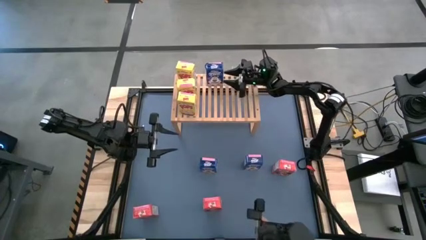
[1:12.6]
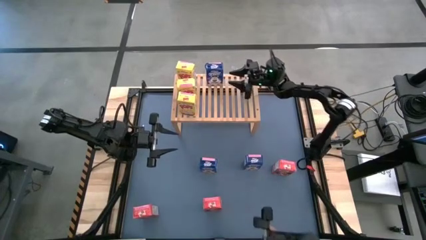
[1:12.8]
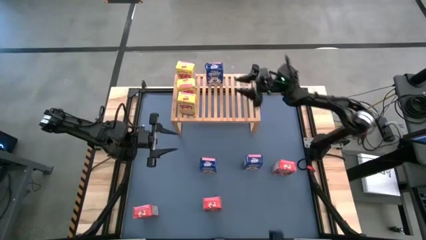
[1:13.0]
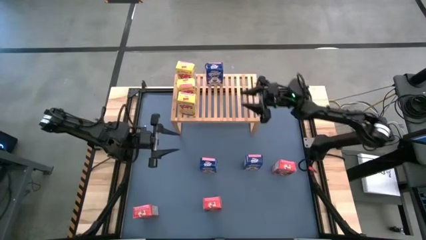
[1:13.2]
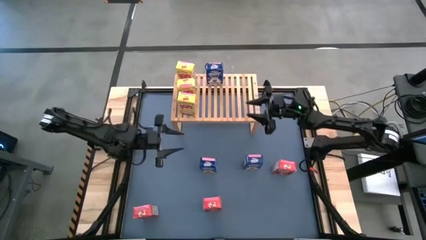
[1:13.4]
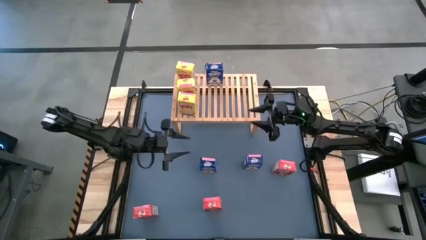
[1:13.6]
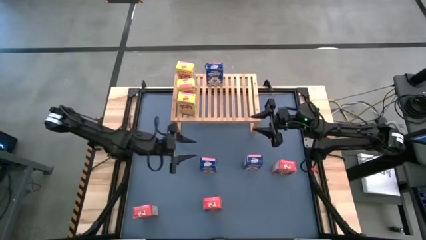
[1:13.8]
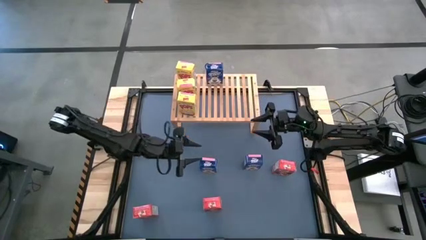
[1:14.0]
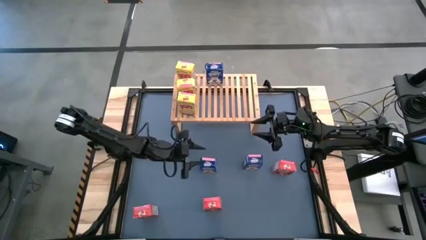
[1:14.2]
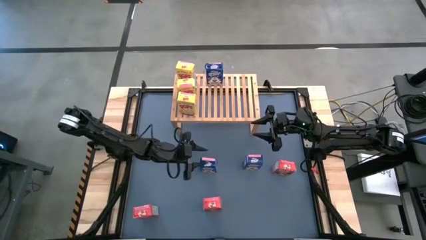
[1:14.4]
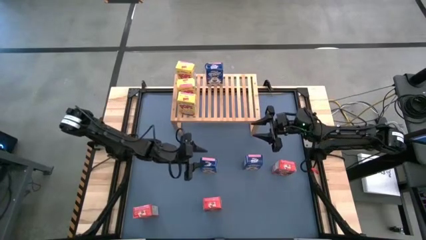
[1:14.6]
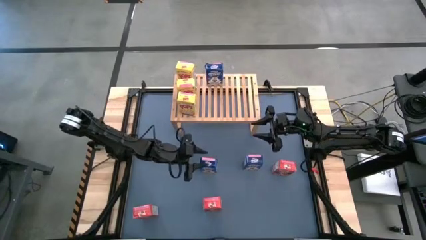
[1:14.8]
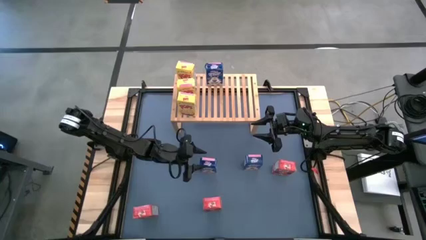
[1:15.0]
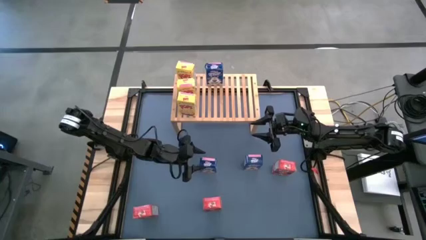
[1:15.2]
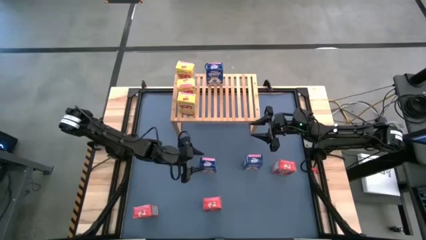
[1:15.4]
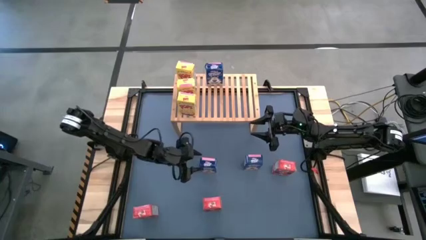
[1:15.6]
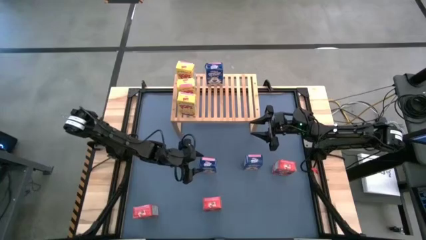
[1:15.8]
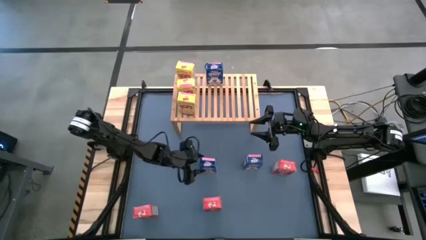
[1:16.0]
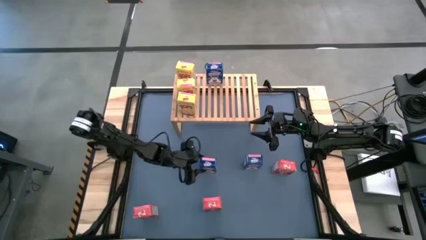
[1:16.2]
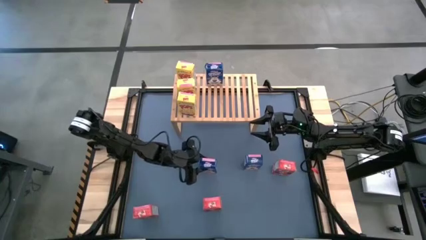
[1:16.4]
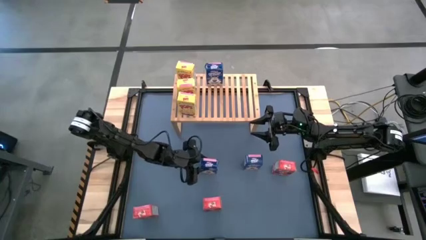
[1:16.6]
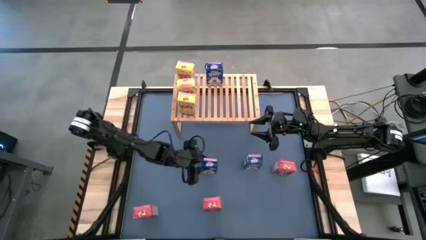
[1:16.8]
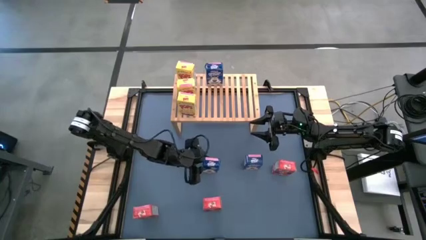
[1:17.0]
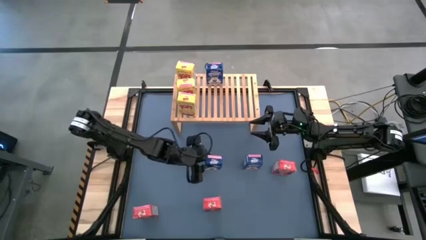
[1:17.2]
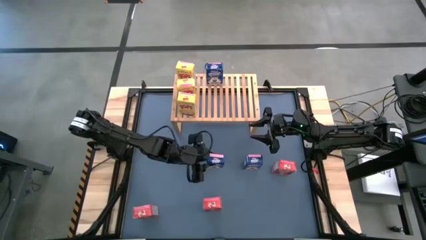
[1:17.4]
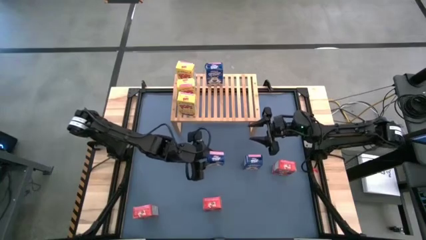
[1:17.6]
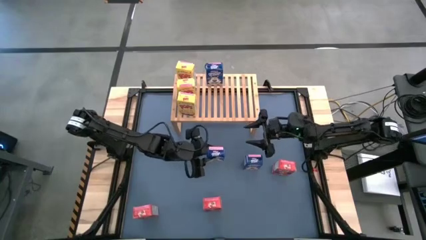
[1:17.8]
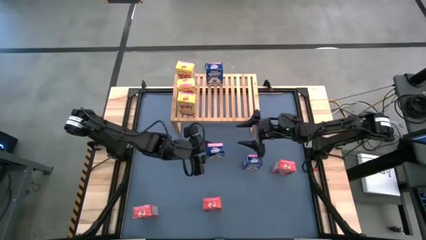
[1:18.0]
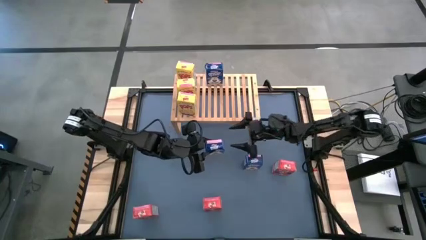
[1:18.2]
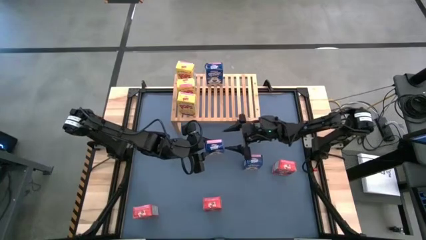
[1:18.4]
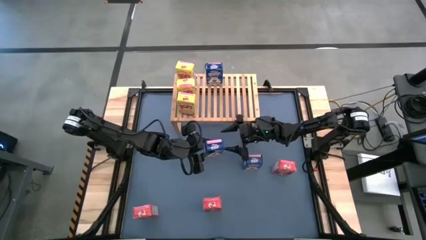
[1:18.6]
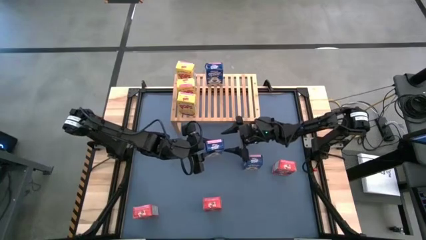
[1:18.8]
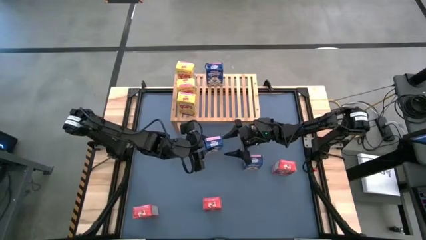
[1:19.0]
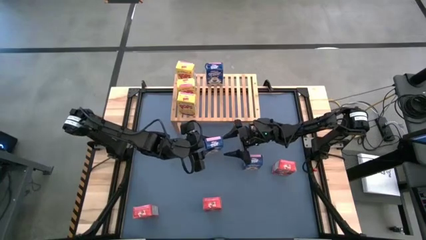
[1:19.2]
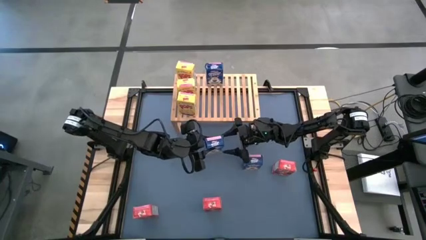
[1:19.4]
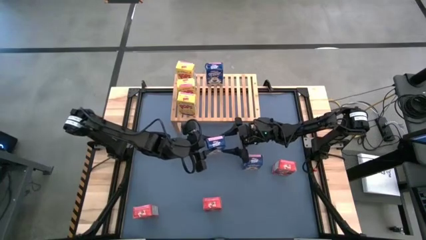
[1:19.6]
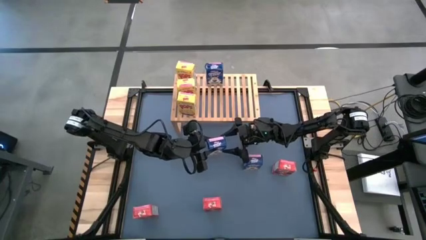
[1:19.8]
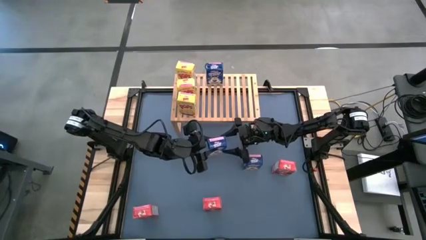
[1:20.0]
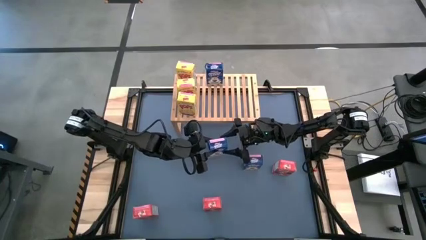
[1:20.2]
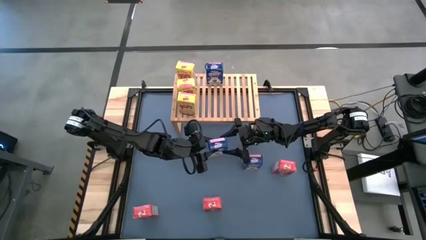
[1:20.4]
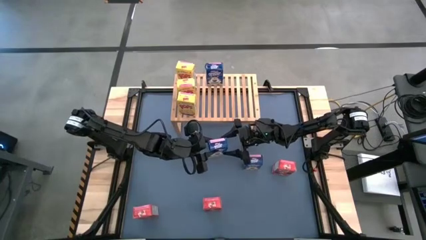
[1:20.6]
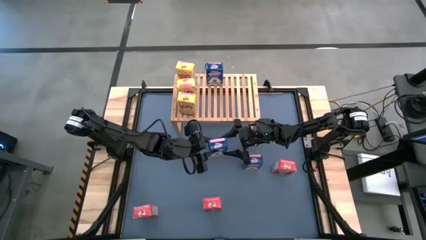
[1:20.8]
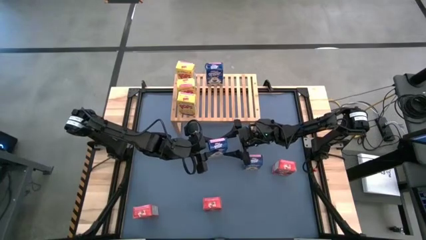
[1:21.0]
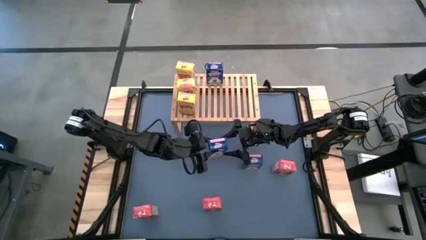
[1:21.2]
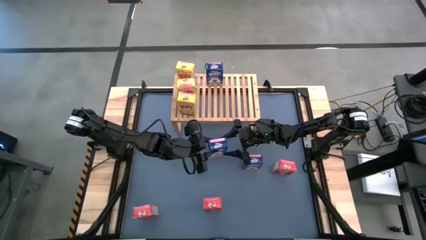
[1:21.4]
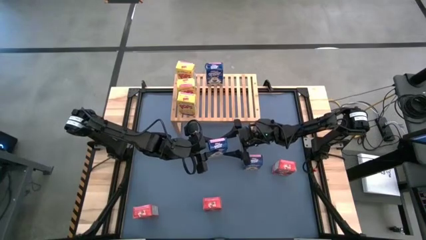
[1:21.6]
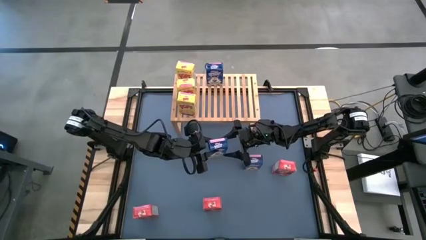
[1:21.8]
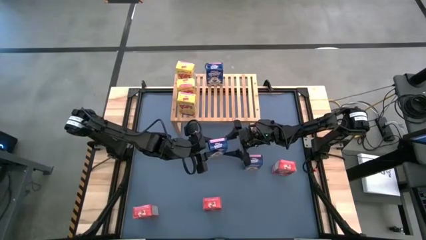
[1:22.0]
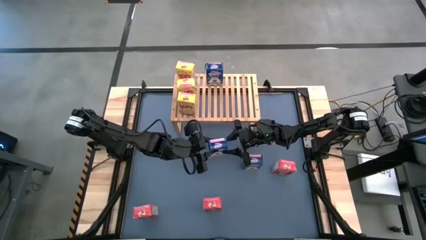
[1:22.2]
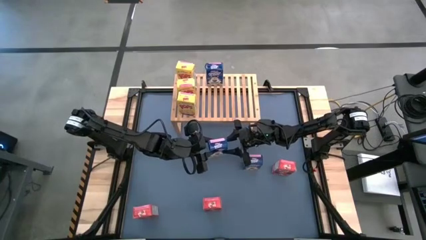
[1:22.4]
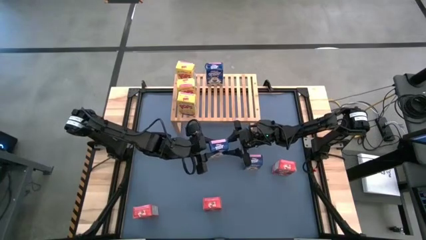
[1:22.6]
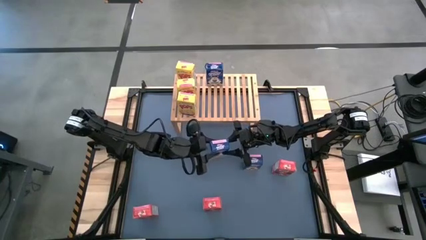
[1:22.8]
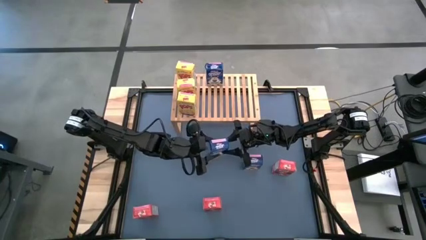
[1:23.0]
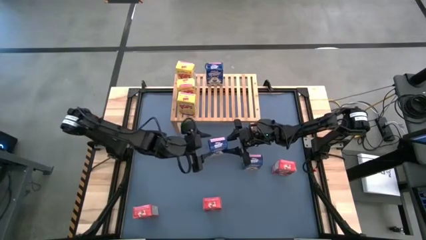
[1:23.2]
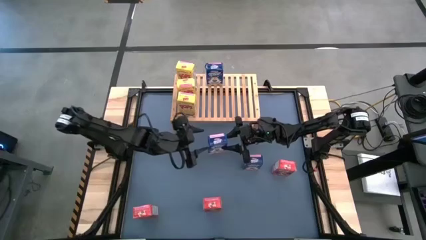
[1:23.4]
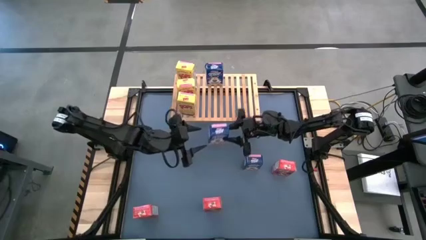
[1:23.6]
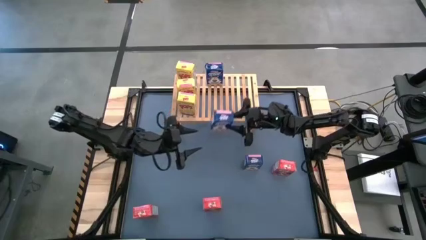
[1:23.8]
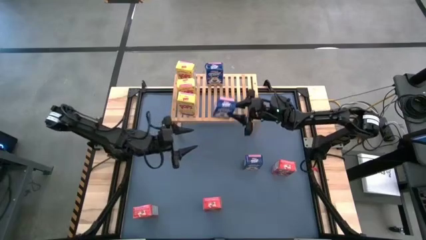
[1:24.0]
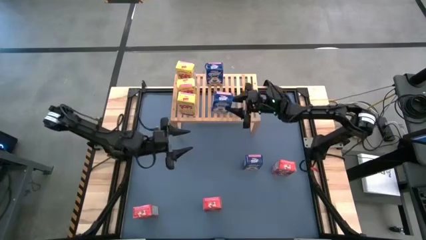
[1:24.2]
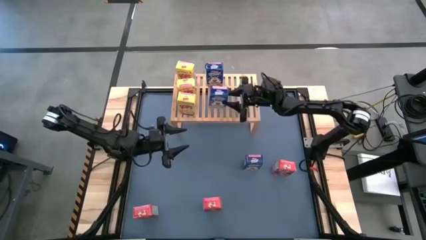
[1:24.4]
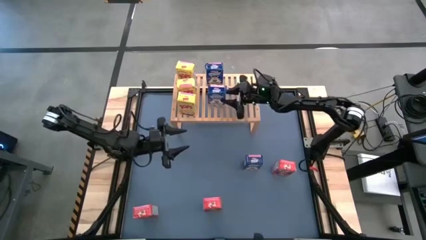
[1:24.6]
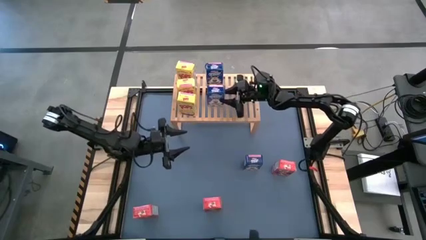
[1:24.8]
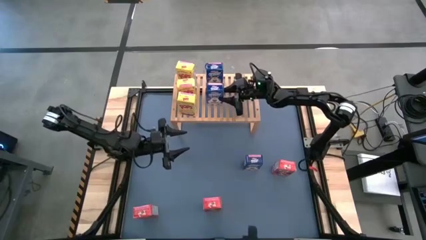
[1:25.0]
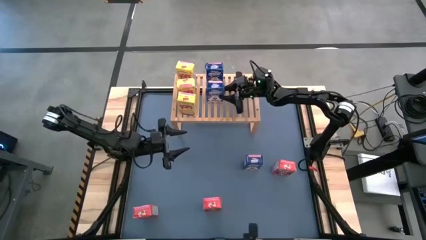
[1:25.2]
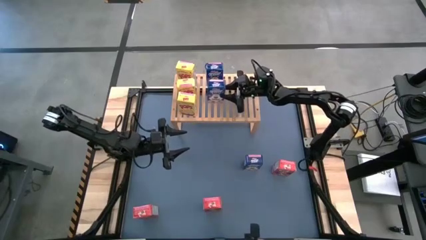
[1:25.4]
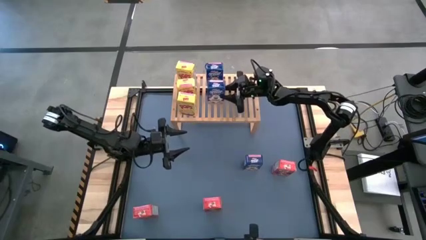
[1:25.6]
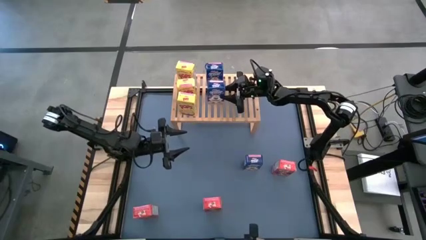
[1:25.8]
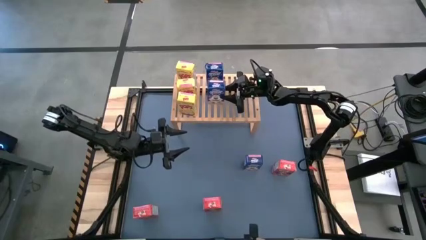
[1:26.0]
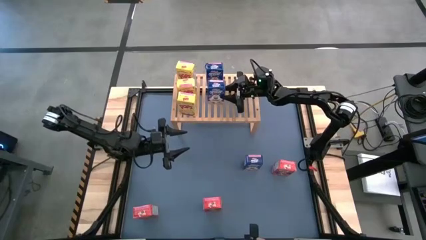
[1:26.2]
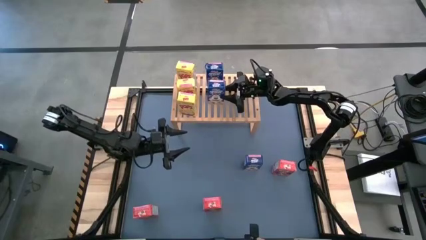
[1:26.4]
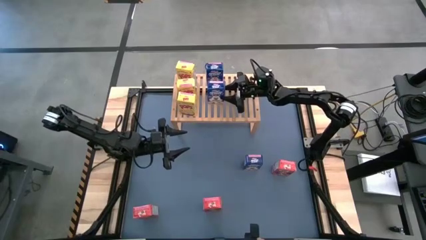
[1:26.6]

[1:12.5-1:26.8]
Task: Stack cereal on shelf
Put the left blue cereal box on the shelf aligned with the other blue cereal box
